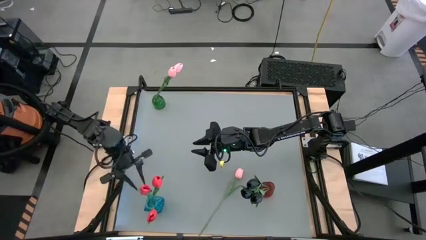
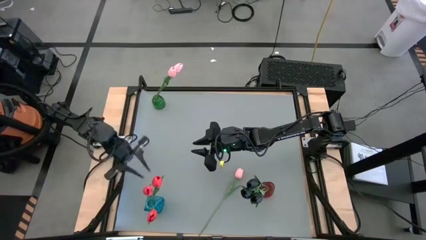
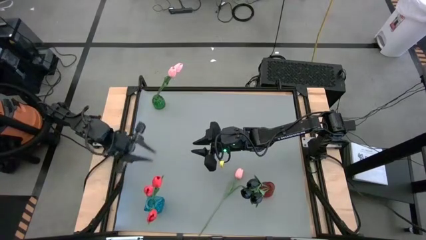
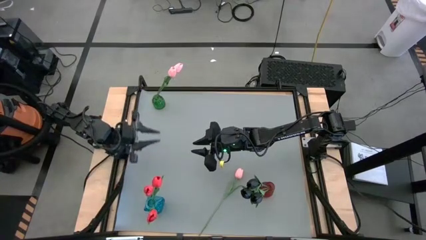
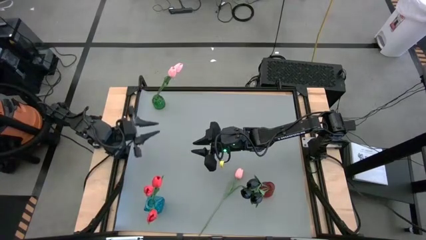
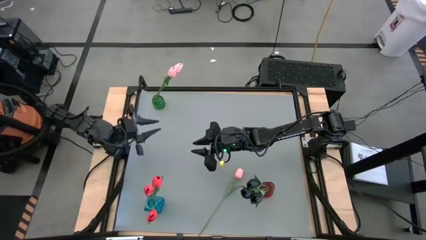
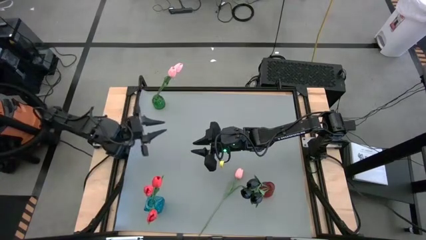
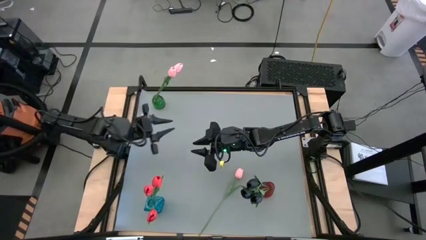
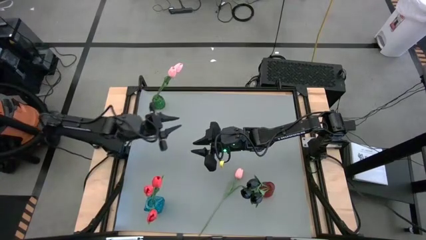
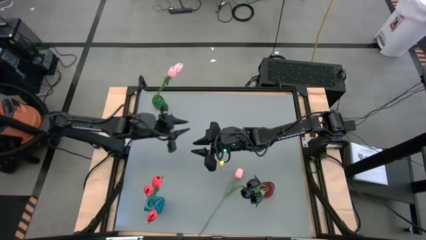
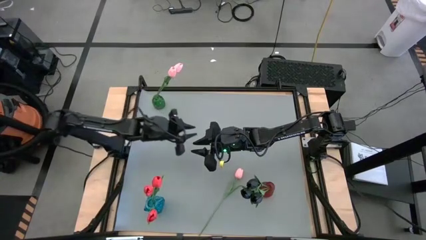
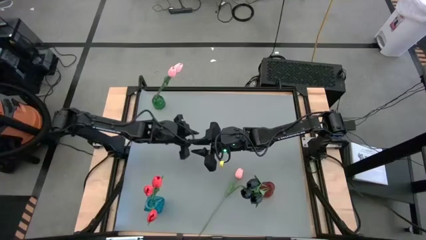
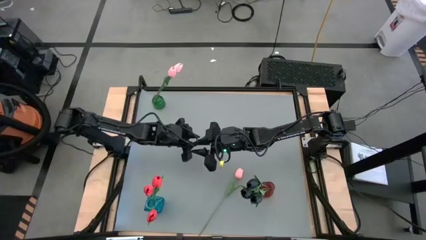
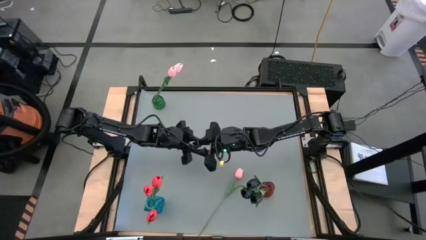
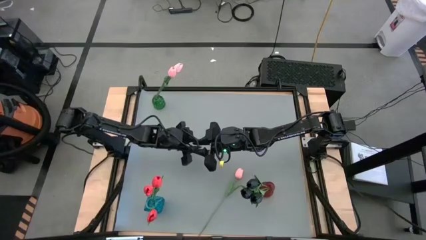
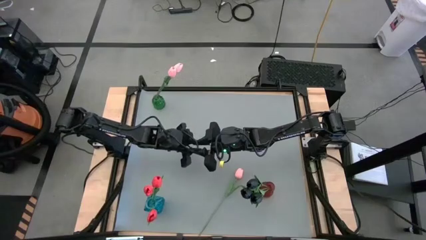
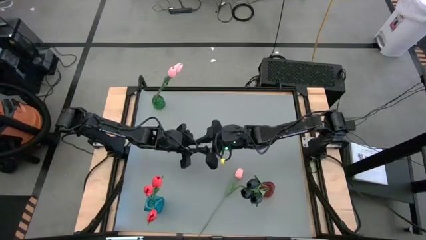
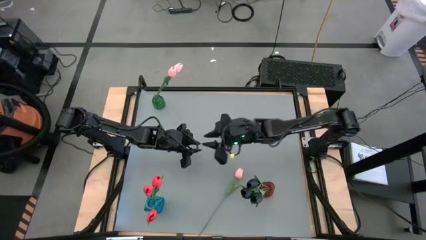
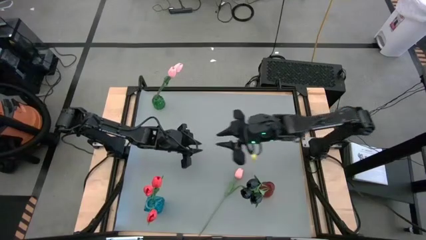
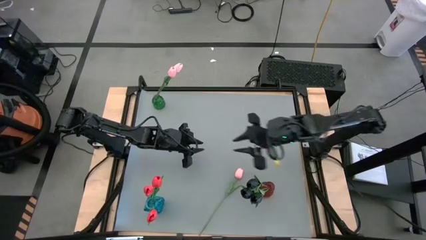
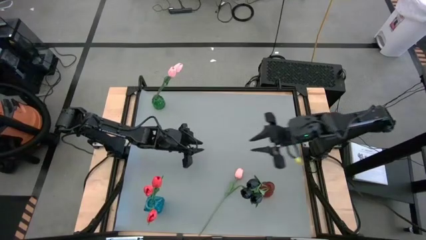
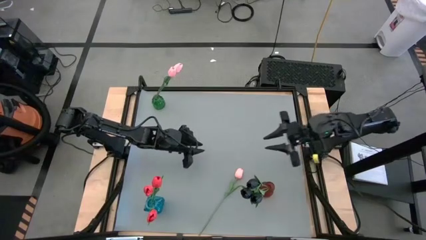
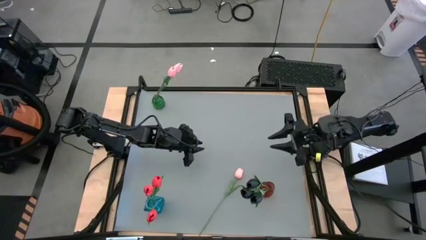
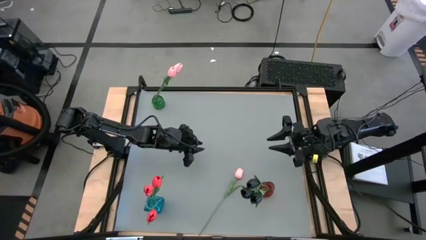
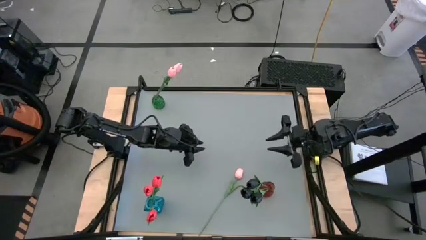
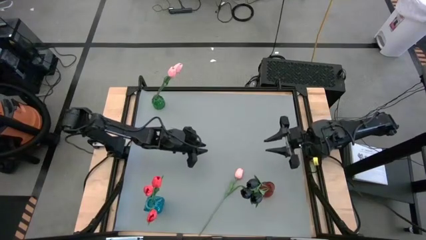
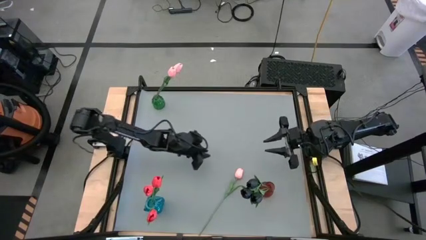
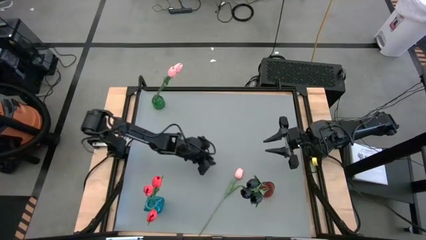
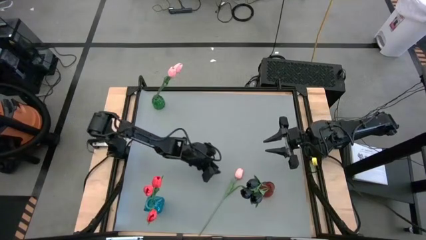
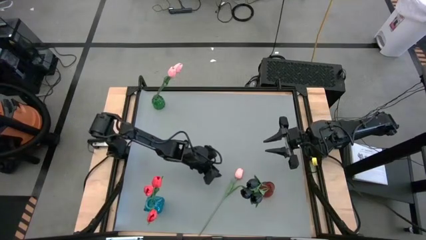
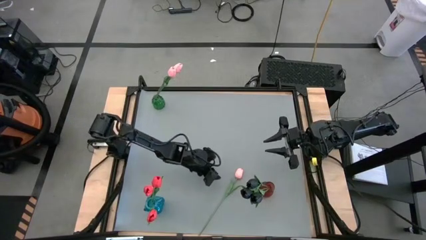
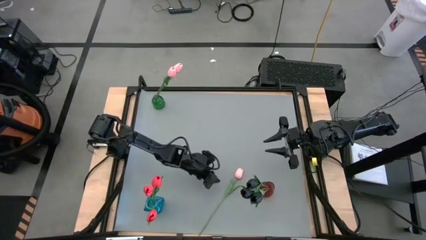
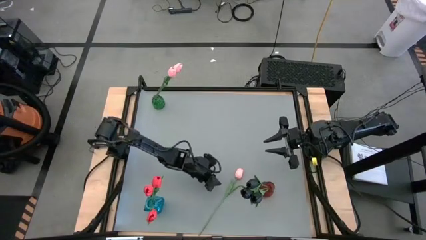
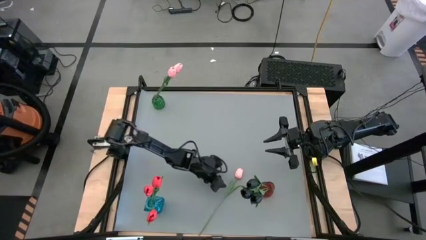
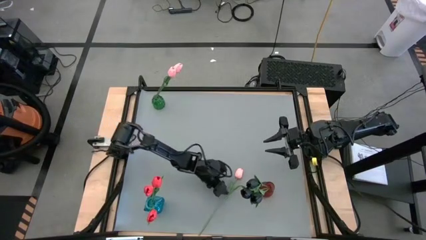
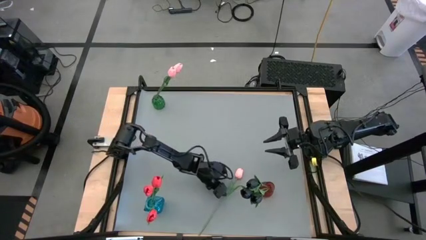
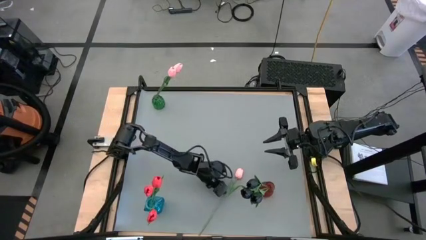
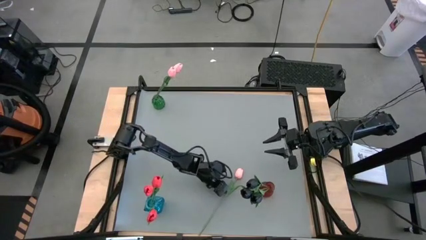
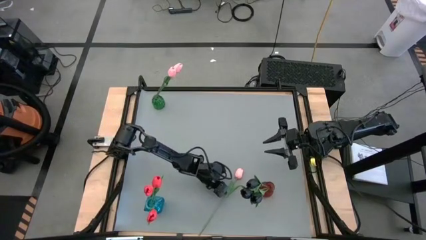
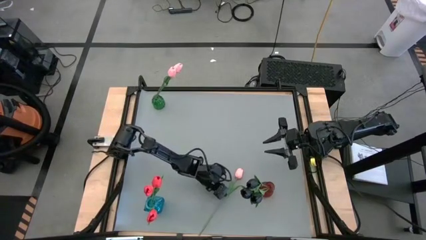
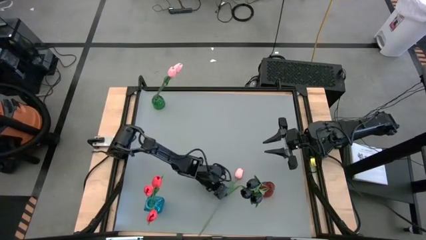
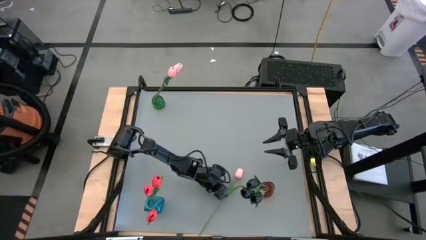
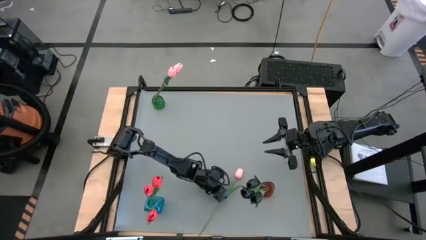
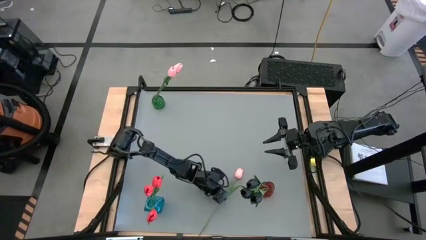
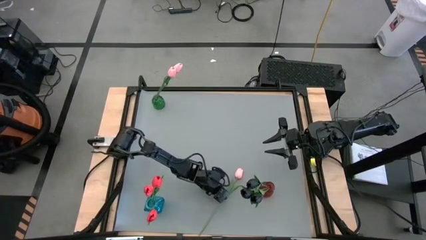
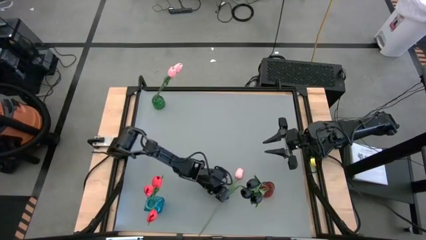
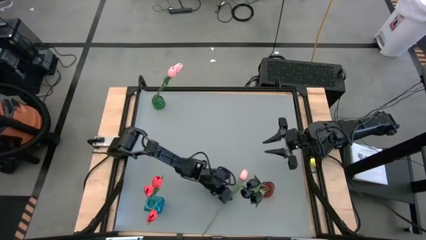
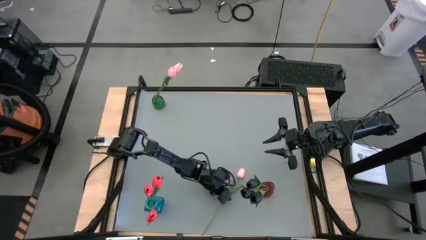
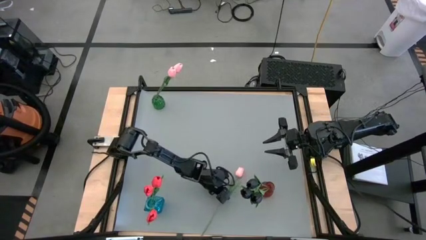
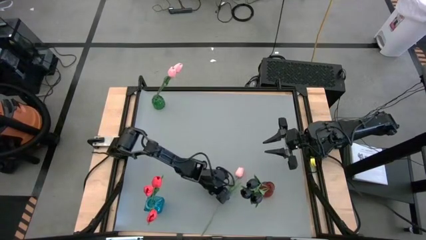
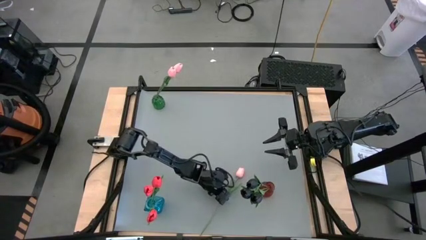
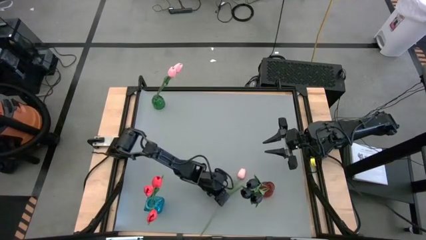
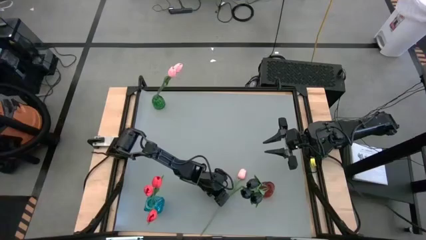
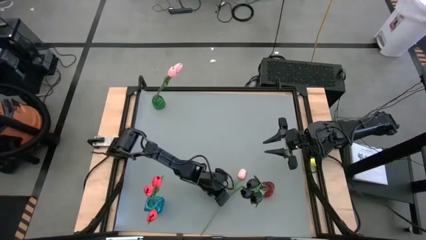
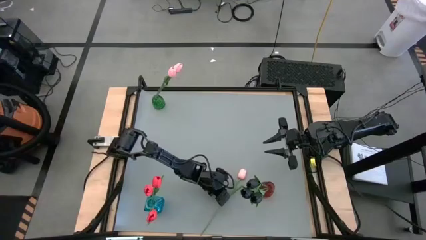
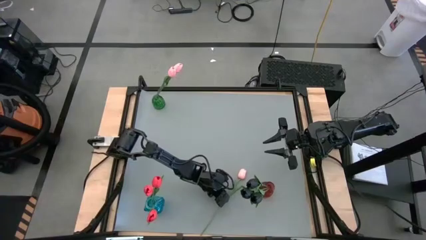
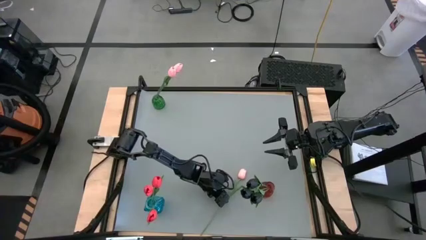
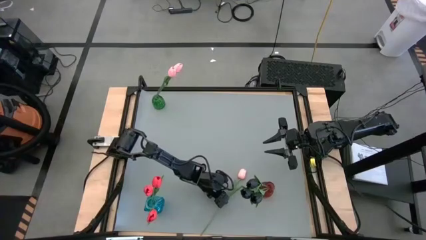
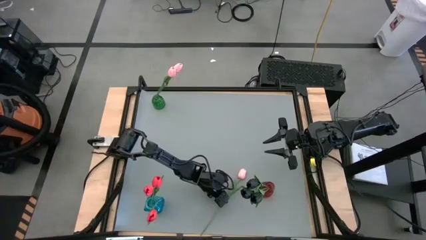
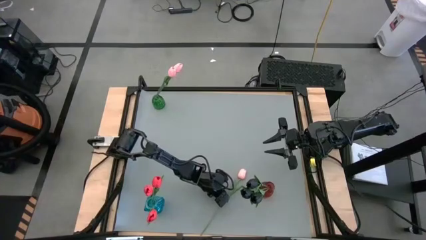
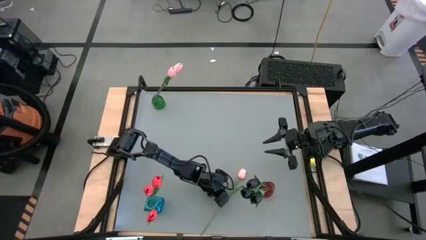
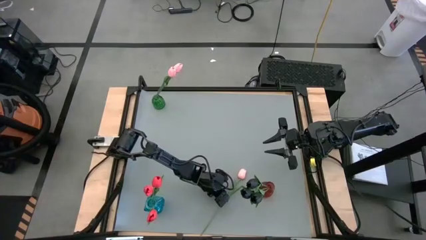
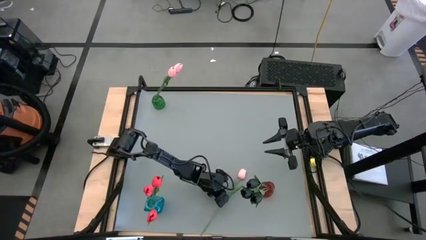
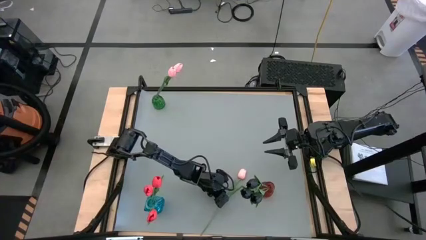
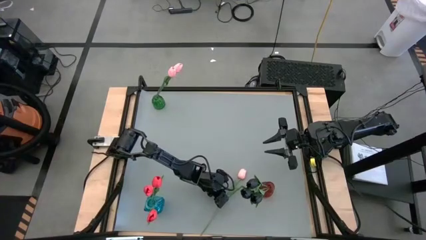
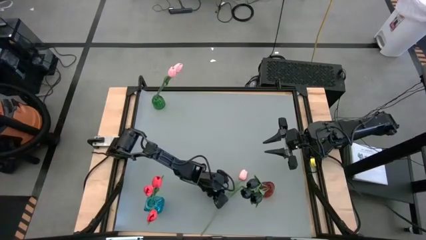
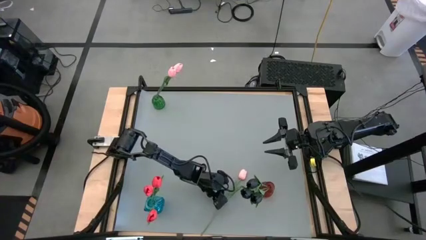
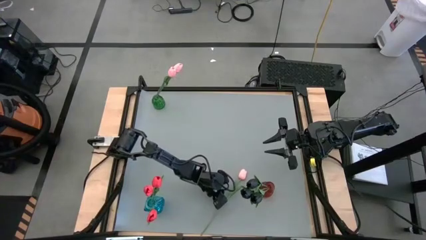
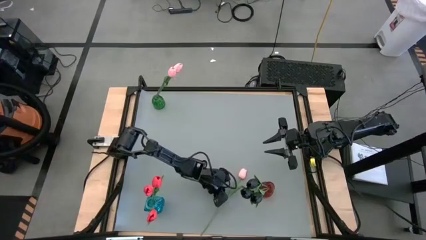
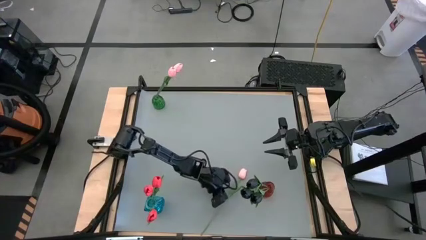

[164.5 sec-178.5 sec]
Task: Sort flowers into vase by color
Put the pink flower into the green vase
